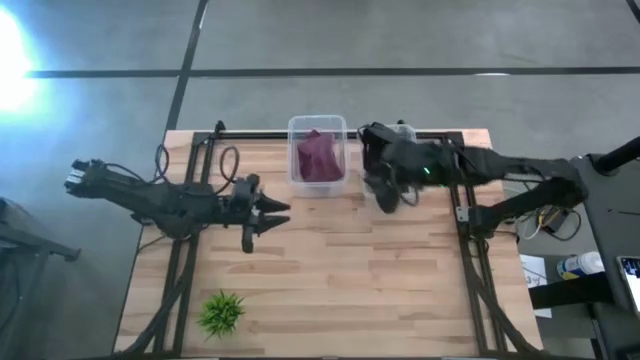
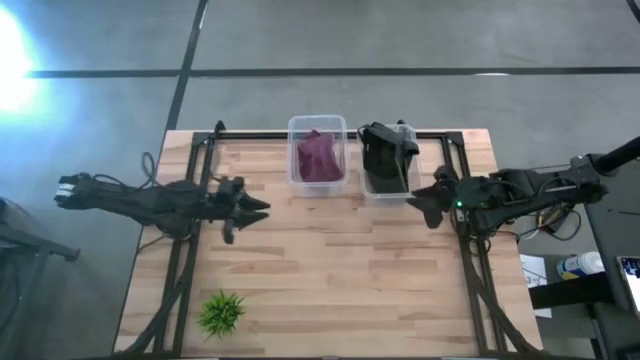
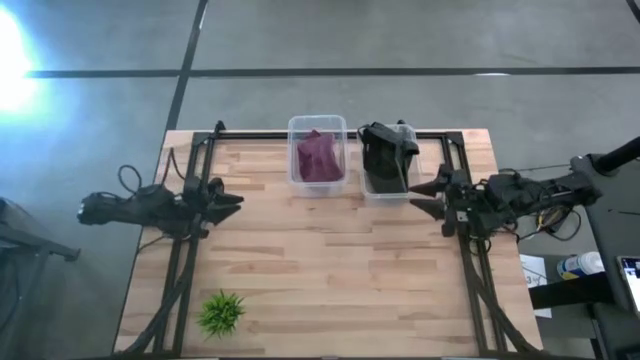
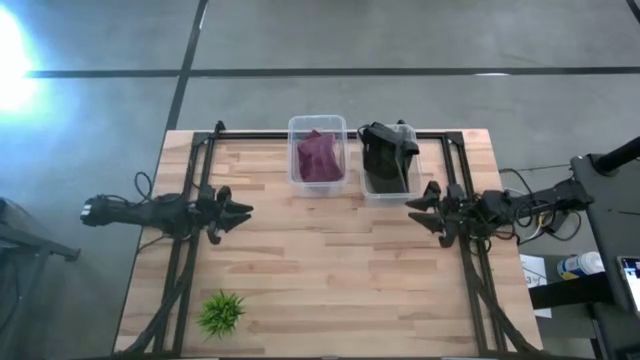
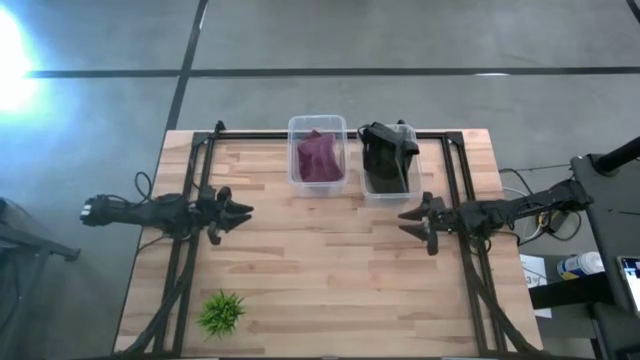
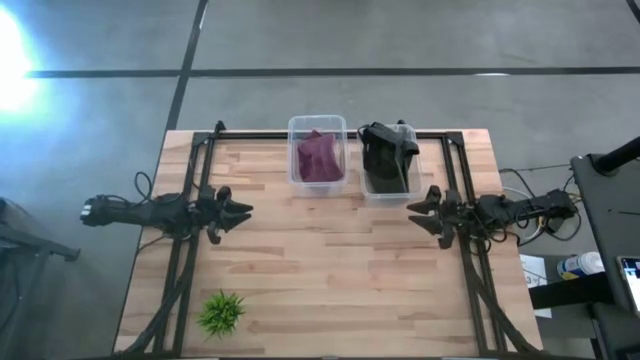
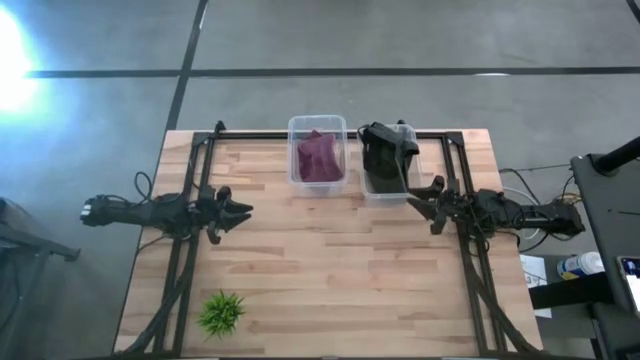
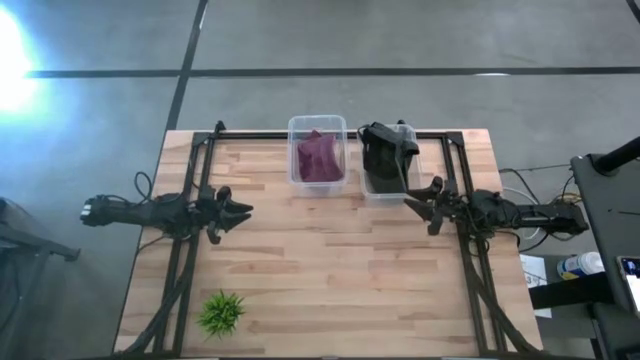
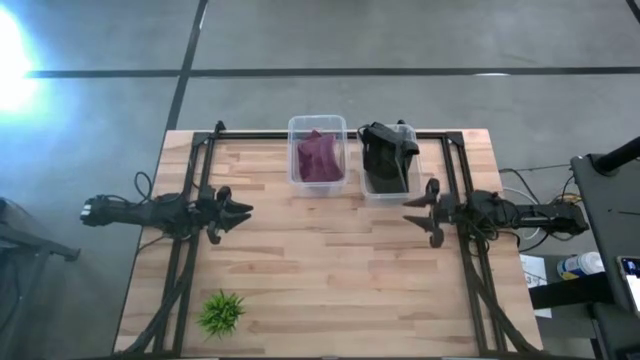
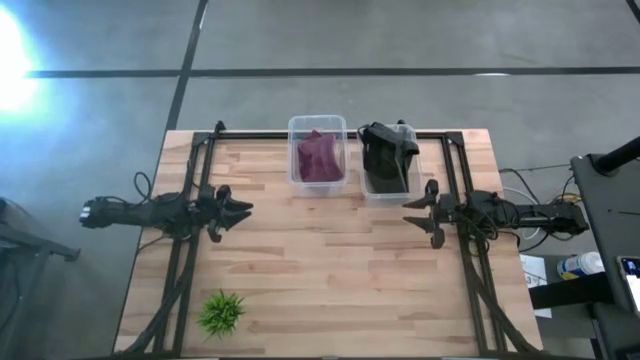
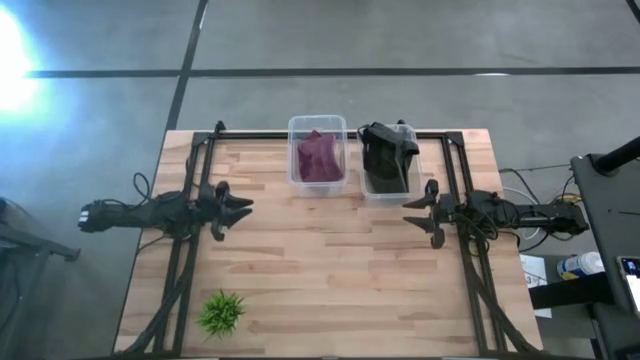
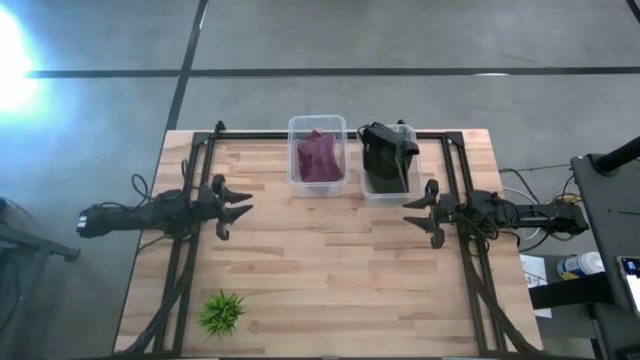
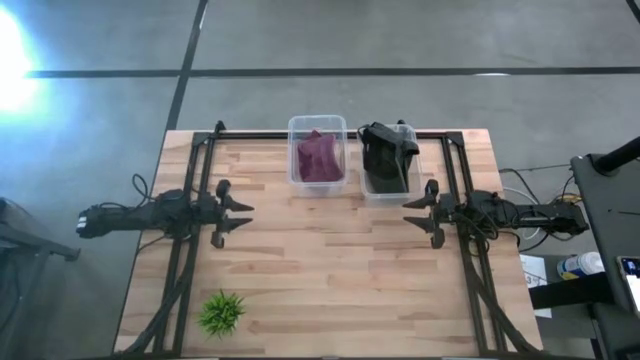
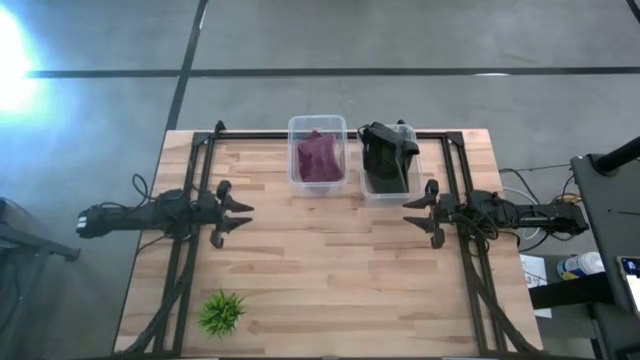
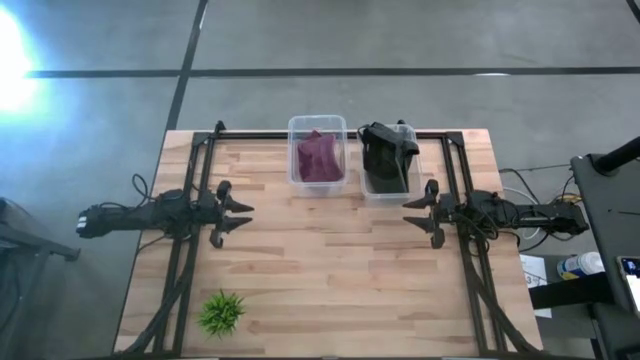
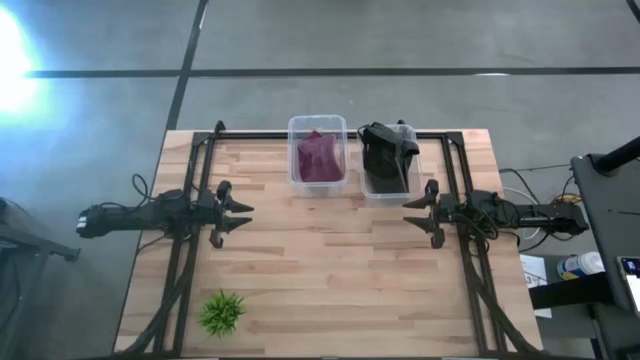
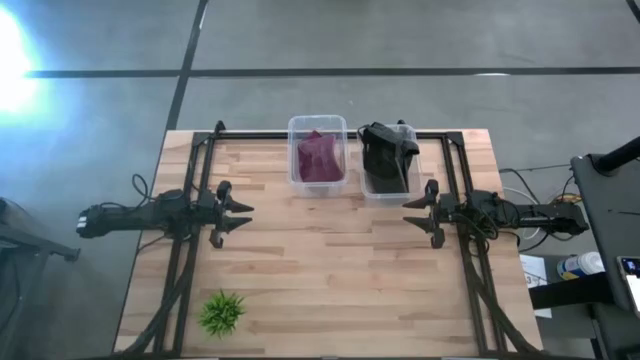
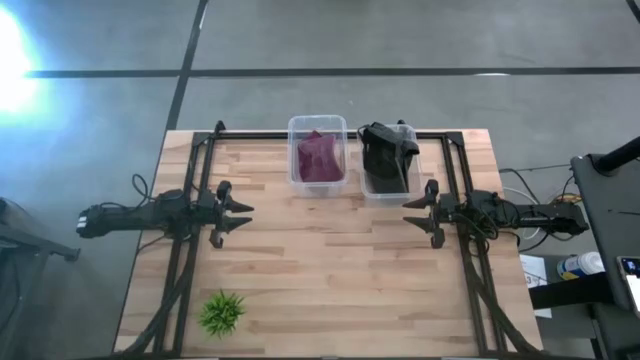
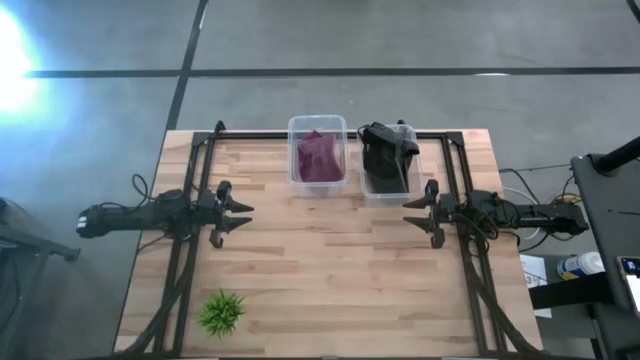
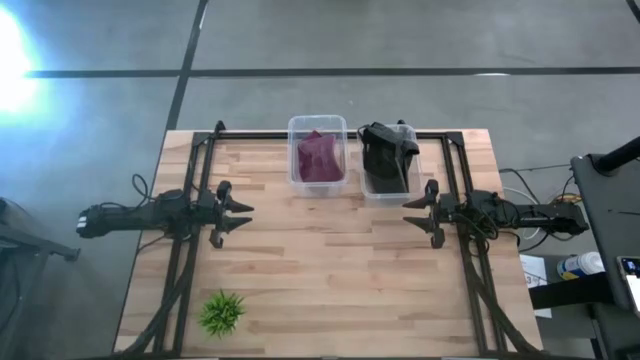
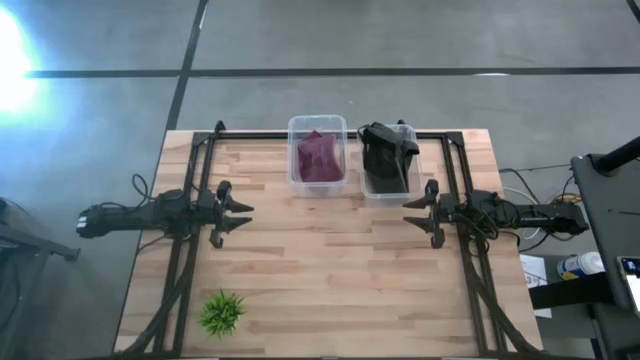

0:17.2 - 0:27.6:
Task: Pick & Place hat
Return to Home Position

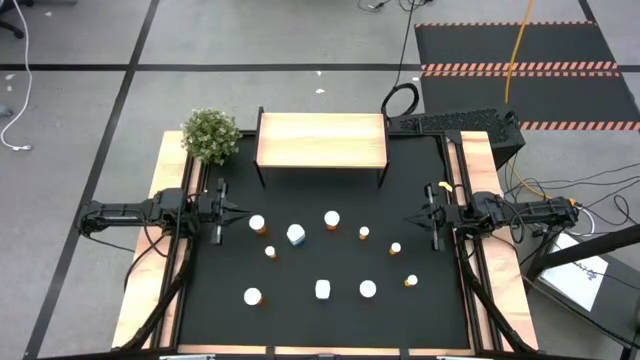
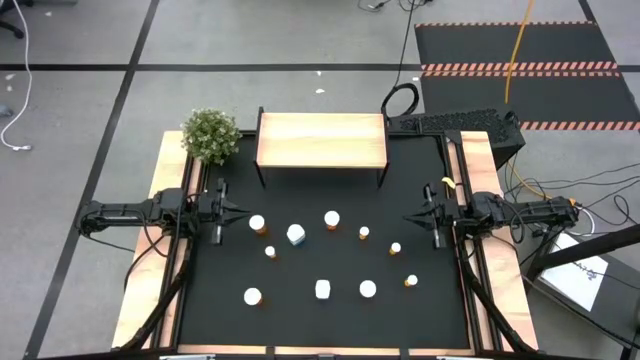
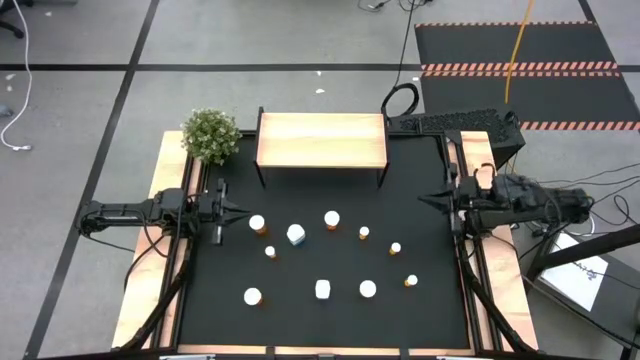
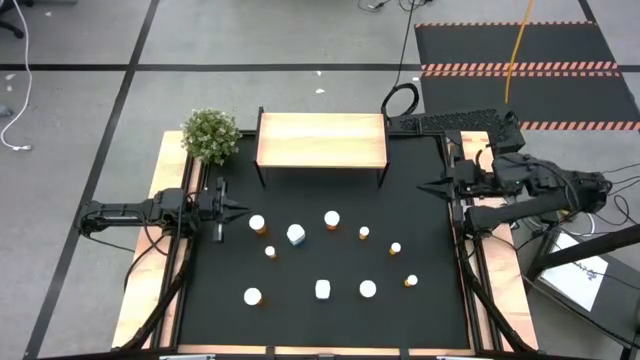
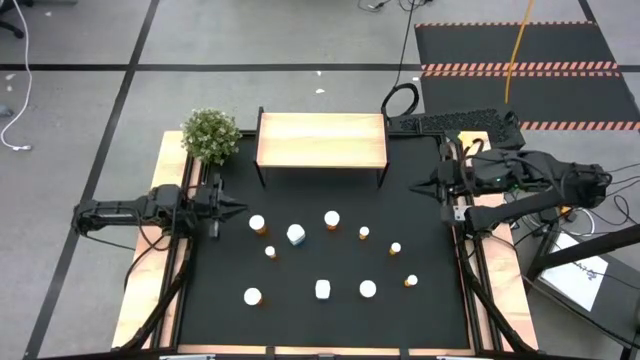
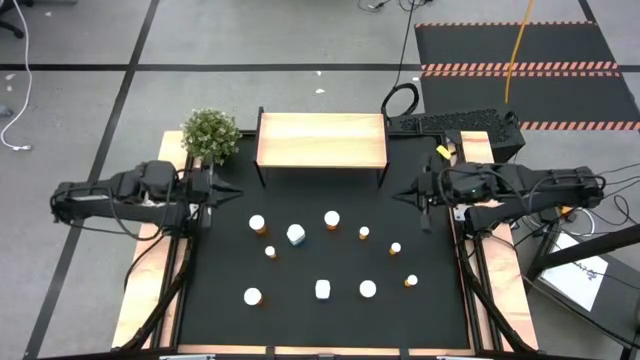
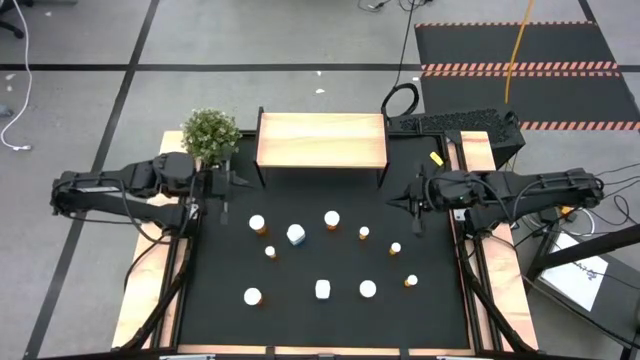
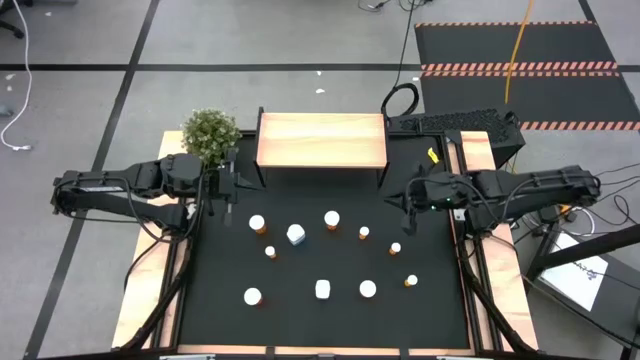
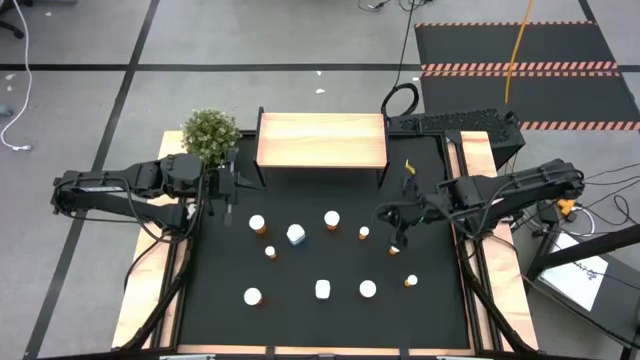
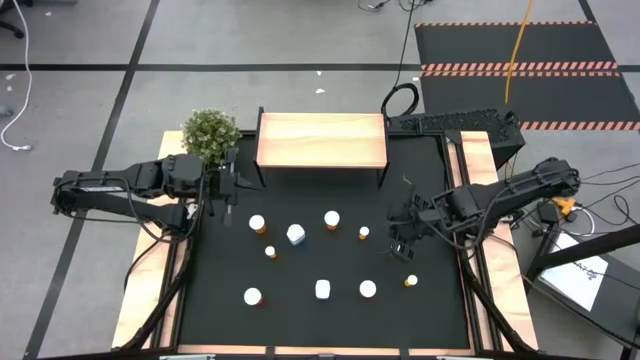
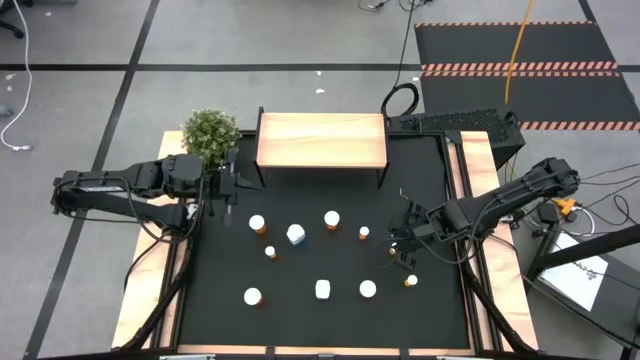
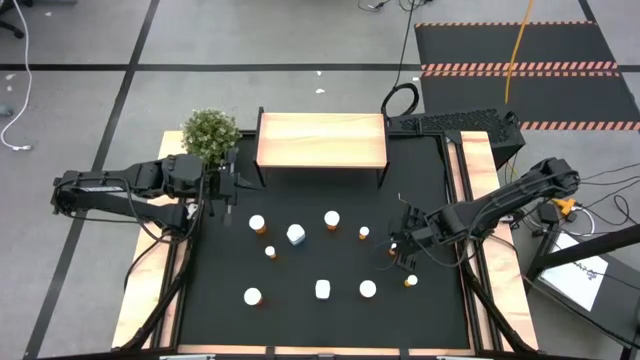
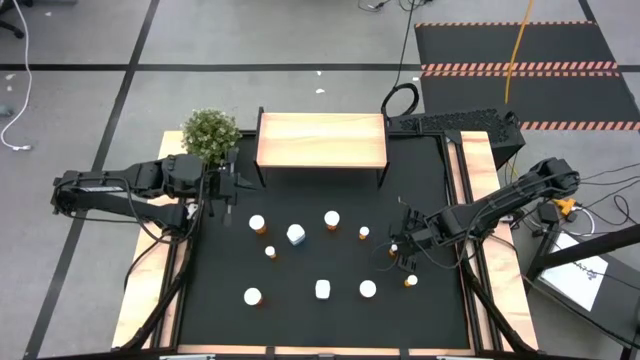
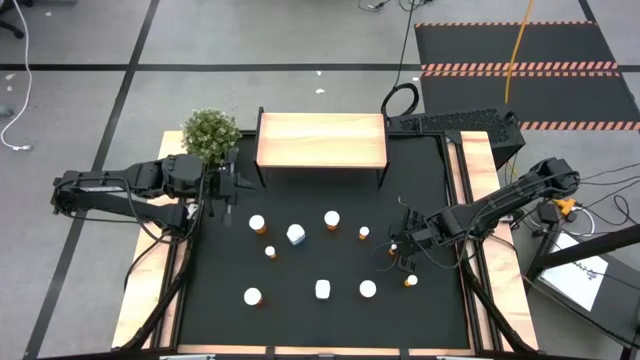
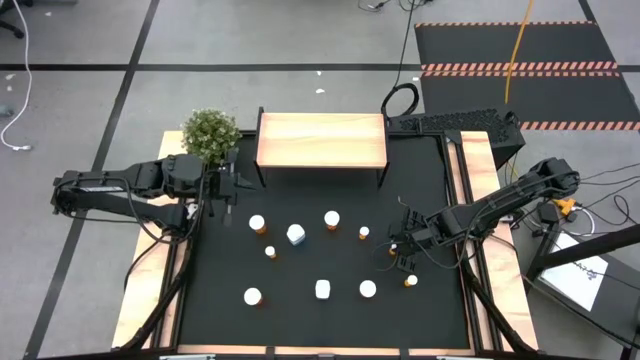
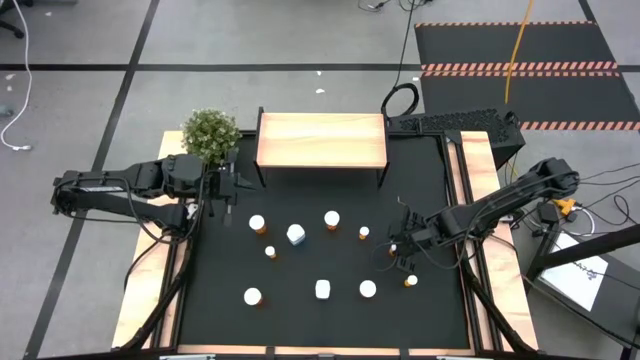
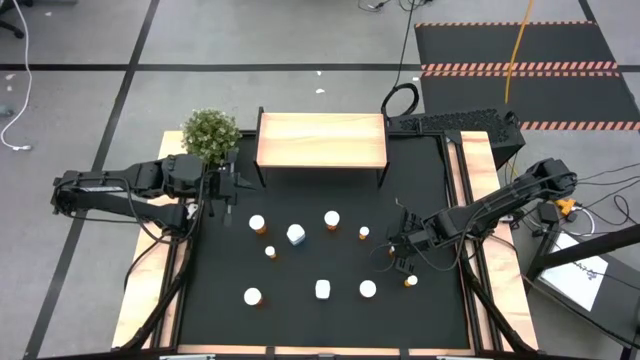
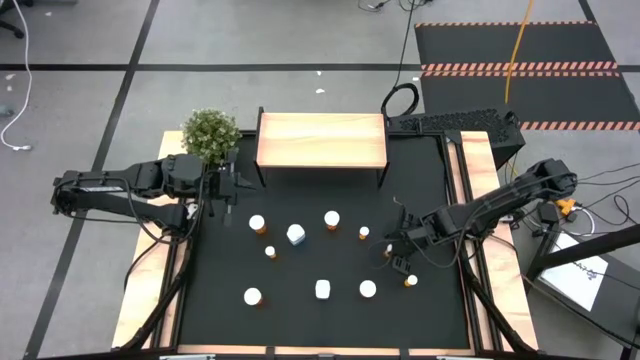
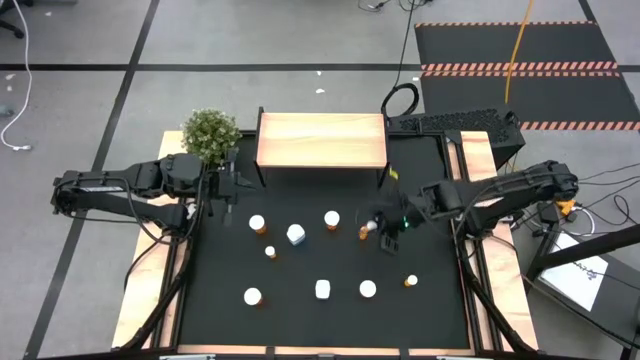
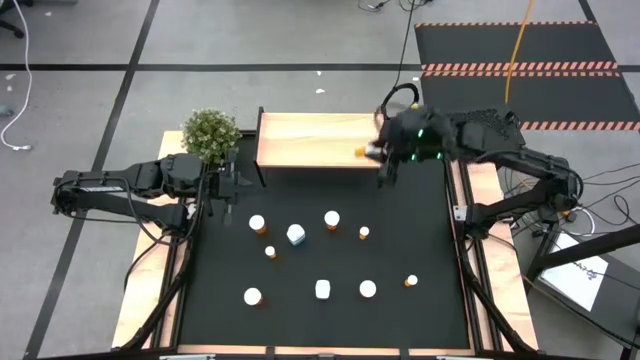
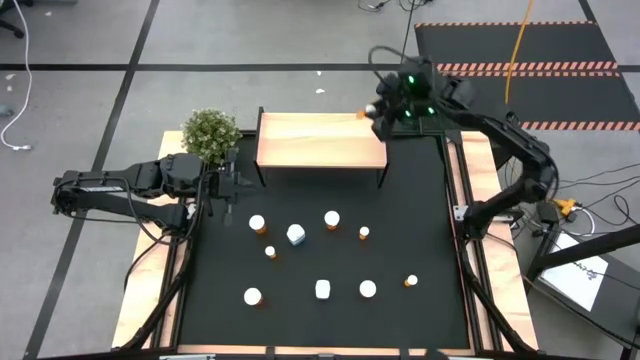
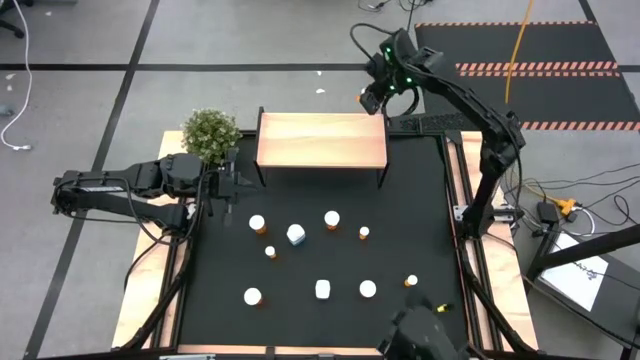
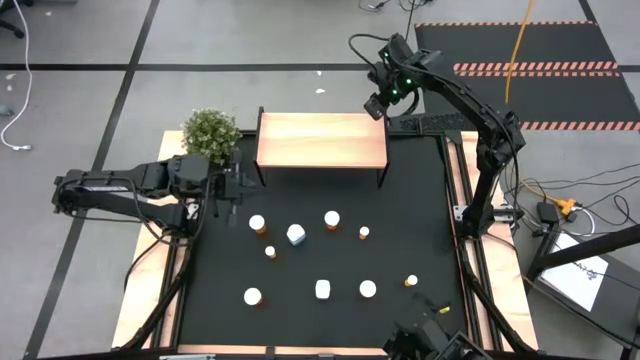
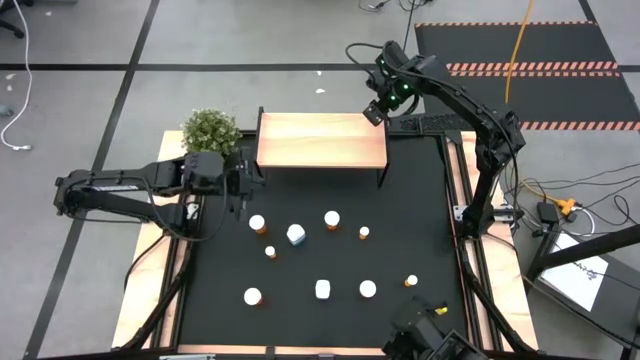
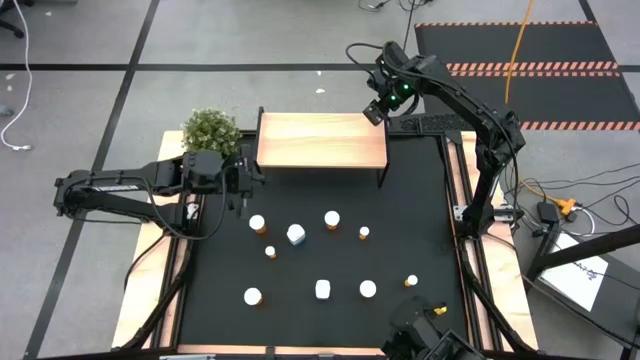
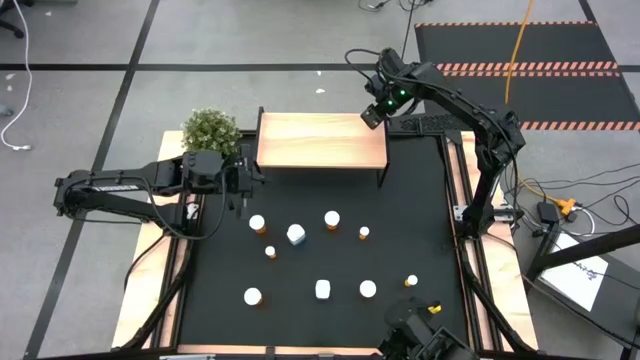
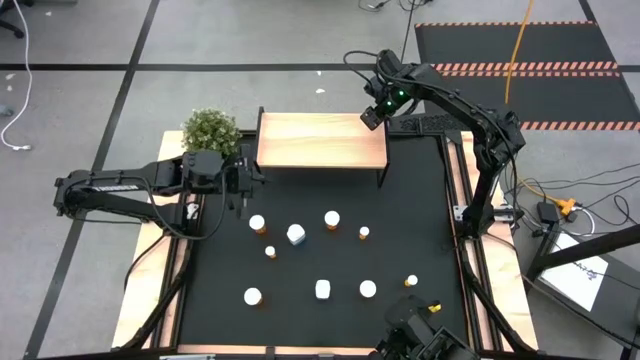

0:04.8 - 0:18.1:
Task: Pick and place medicine bottles onto shelf by color
Put the small orange pill bottle on the shelf
